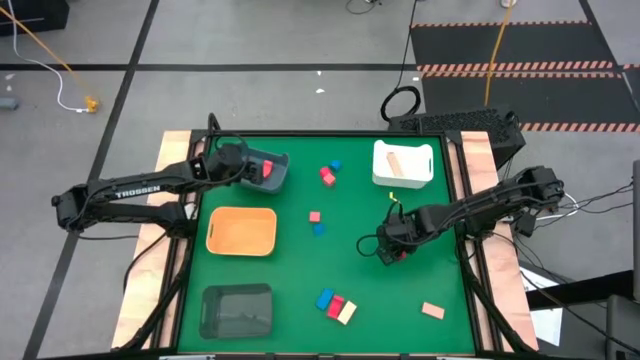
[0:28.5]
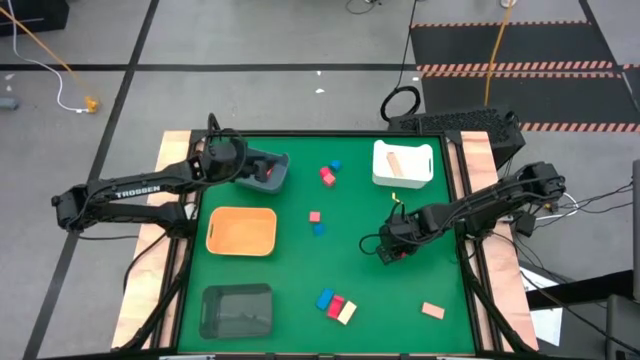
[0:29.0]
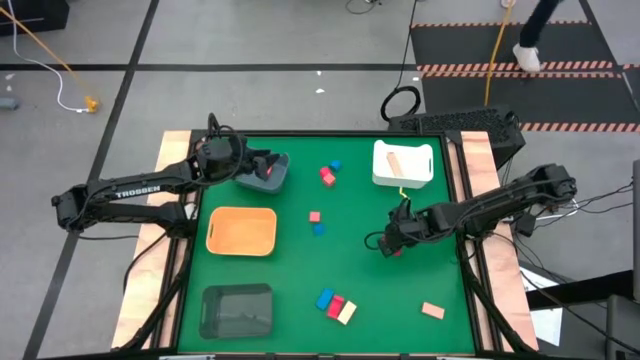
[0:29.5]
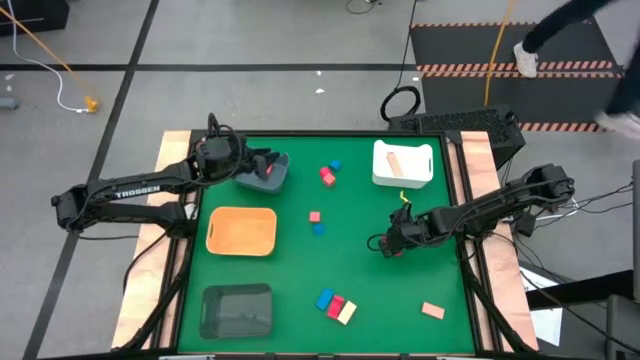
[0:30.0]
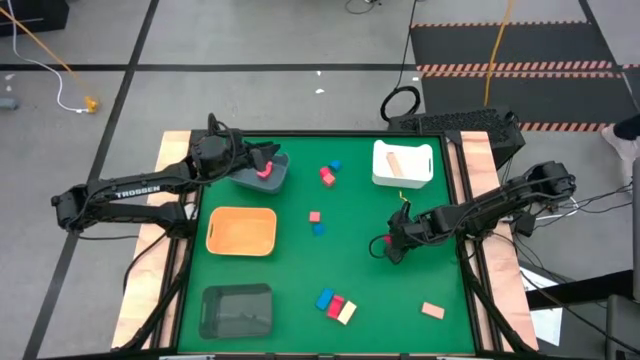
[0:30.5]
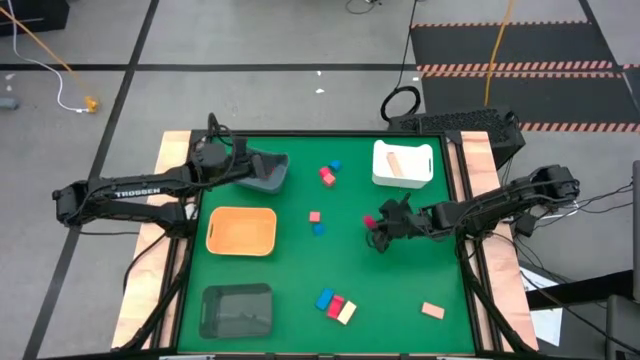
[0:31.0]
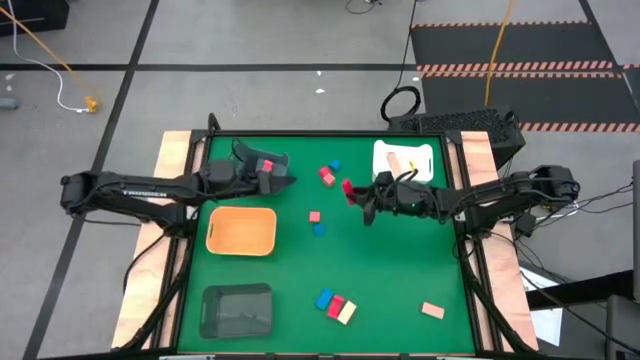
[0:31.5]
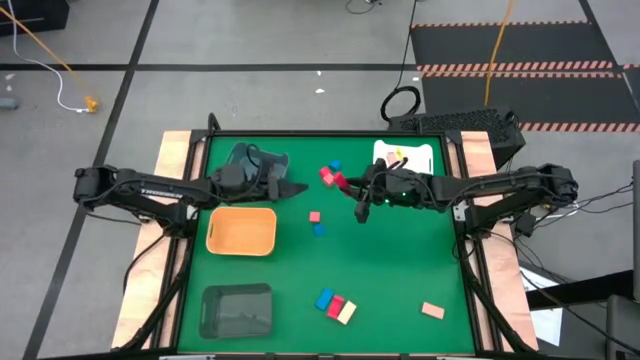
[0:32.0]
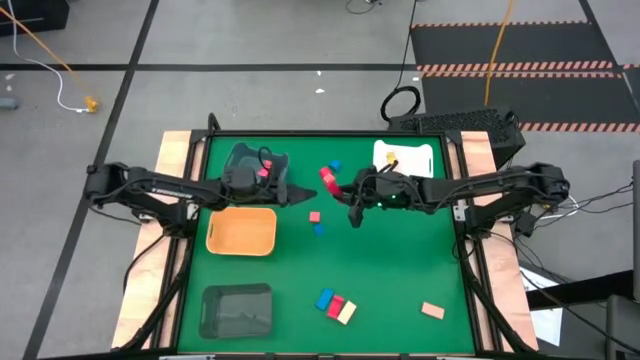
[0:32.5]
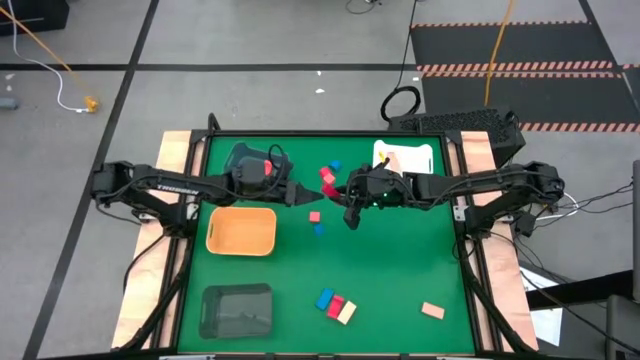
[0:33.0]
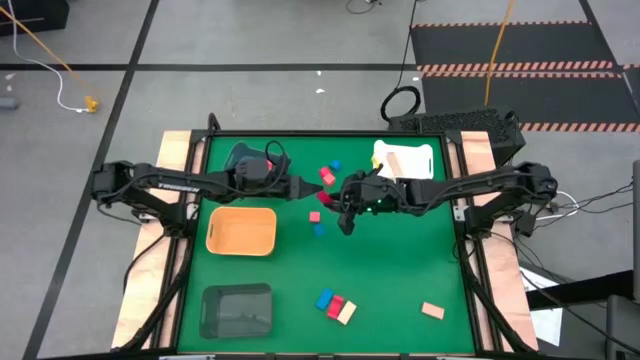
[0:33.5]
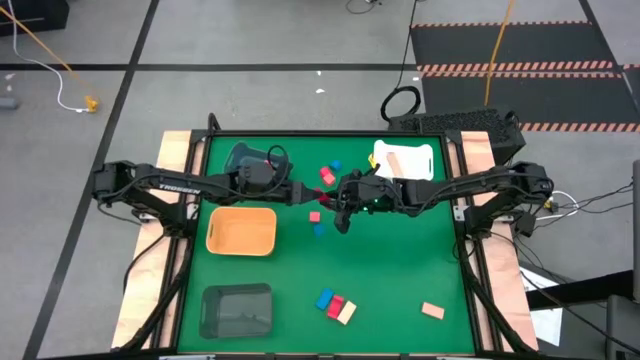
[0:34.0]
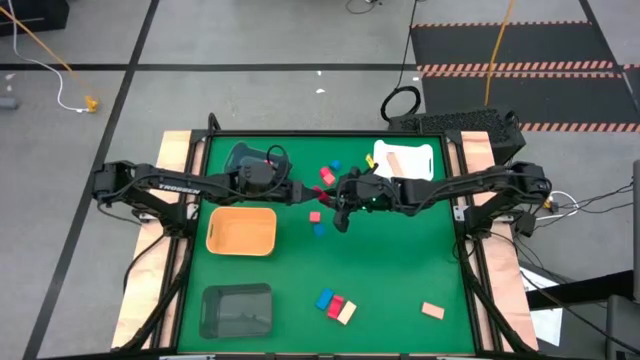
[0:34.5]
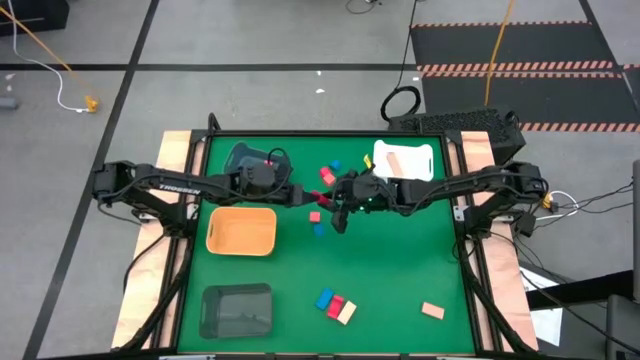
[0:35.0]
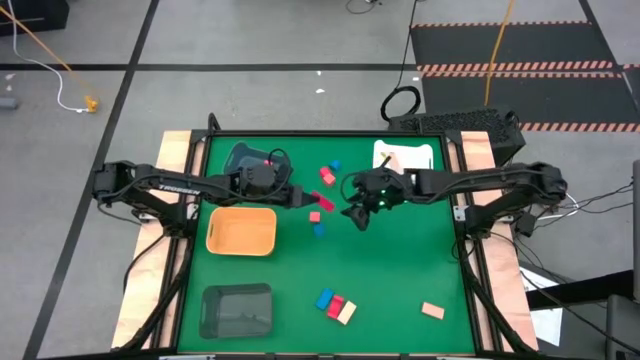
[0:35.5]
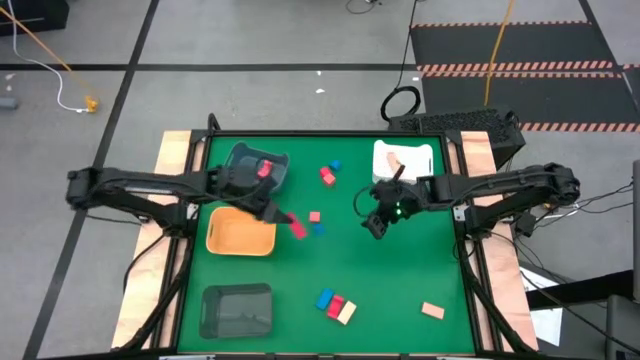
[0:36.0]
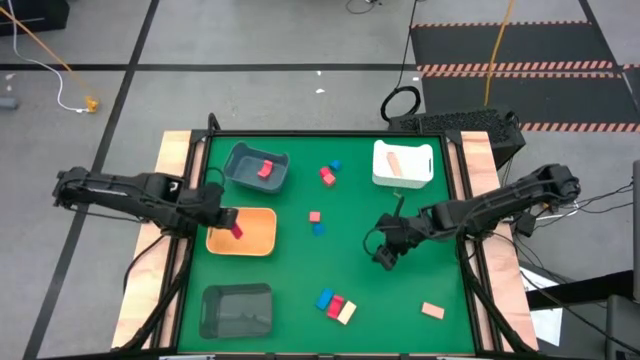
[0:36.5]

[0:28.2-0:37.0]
Task: Sort & place blocks by color
Put the middle right red block into the yellow bin

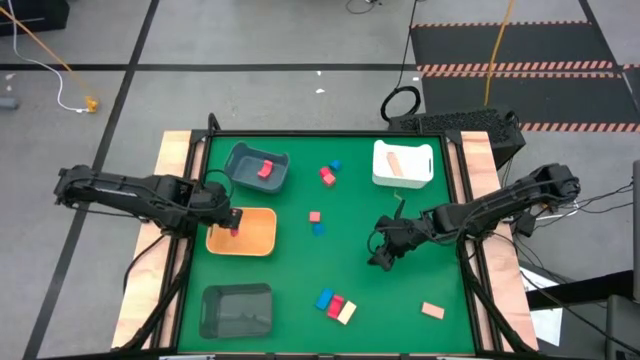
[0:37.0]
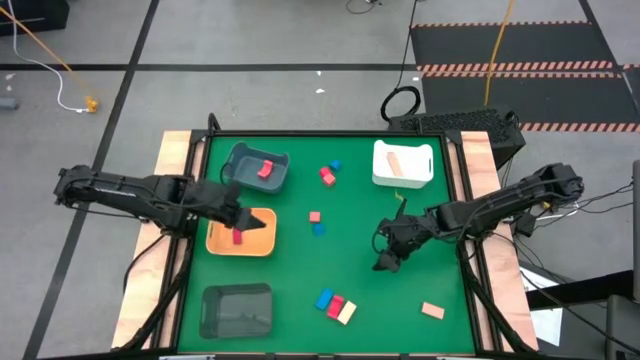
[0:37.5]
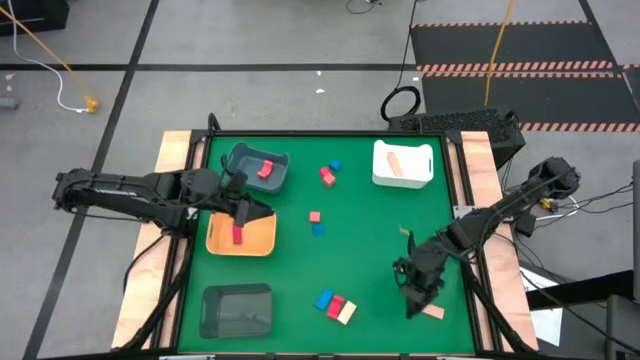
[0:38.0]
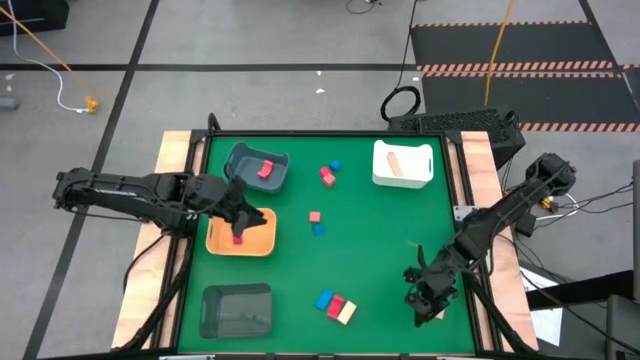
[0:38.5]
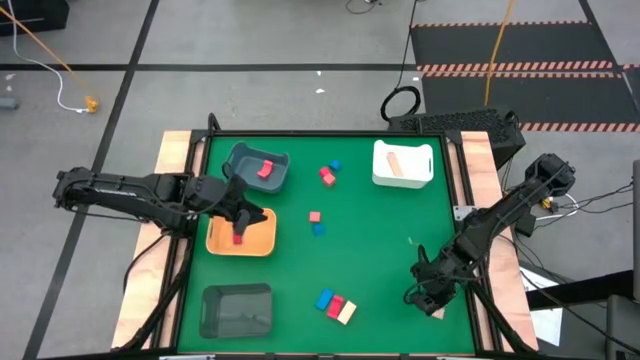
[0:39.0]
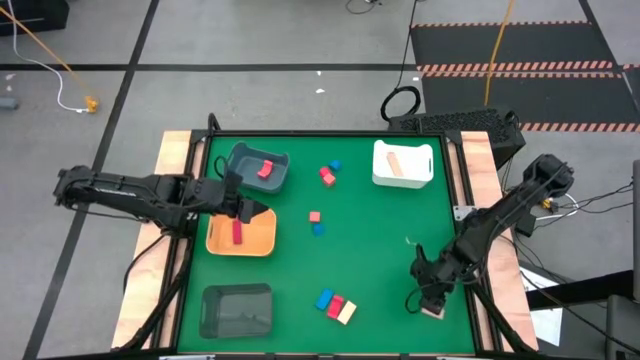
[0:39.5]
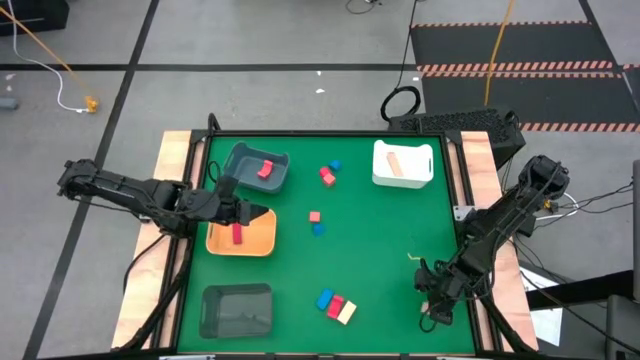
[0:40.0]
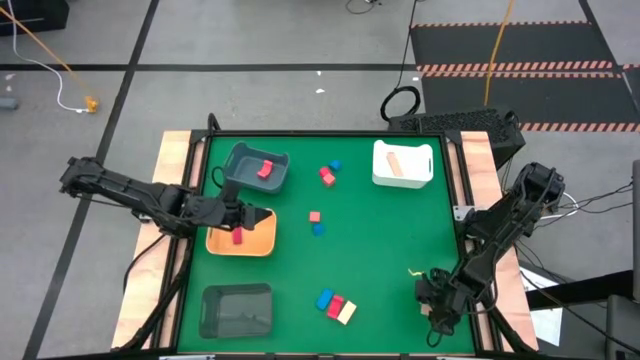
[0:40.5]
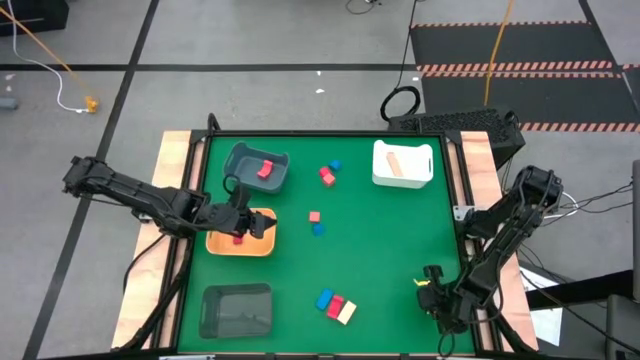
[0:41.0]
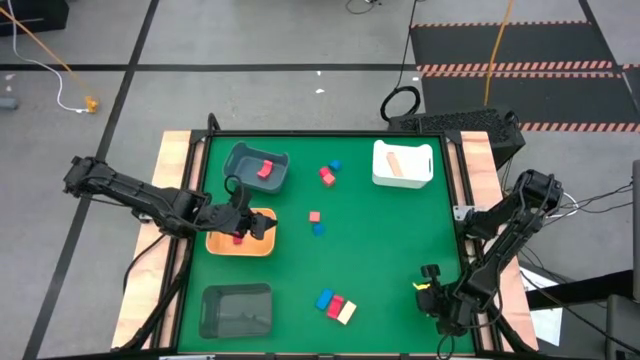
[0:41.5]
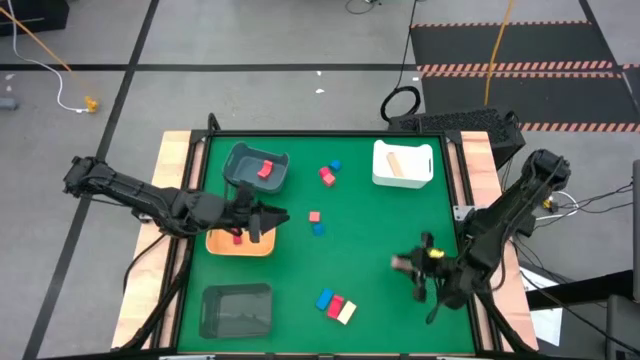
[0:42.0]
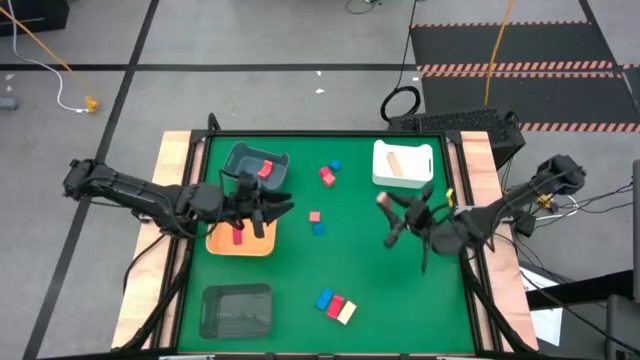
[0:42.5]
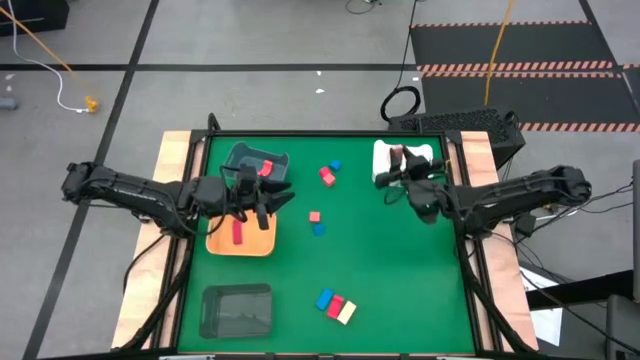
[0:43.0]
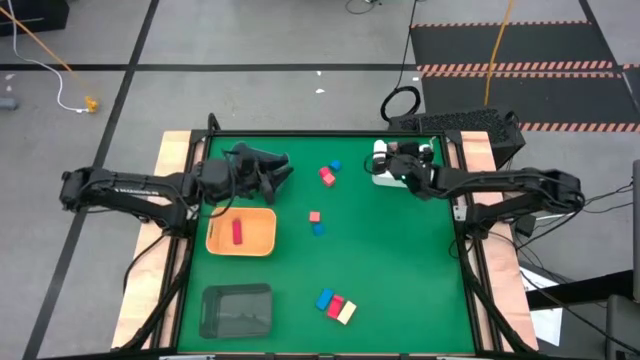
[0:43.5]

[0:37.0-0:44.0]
Put the right brown block into the white bin

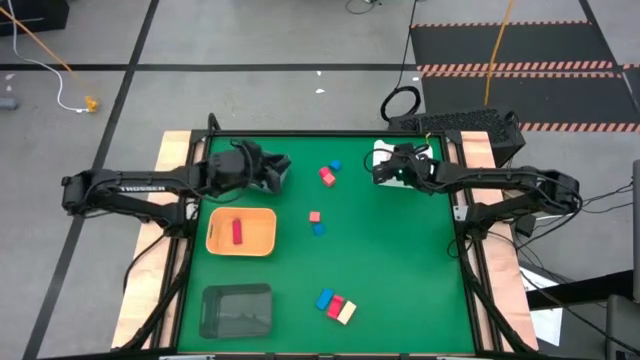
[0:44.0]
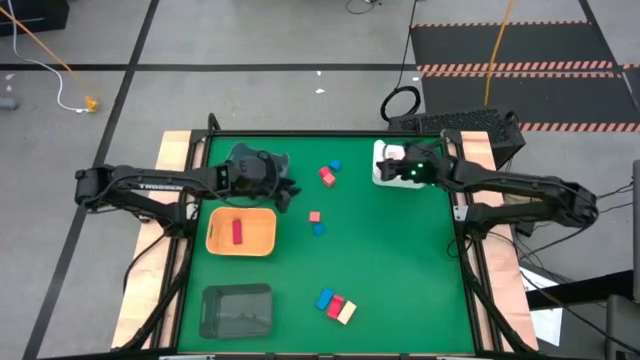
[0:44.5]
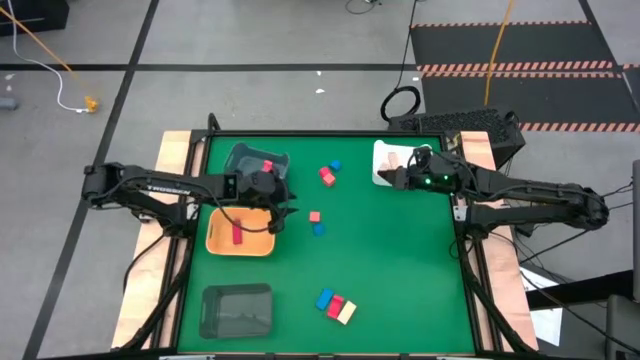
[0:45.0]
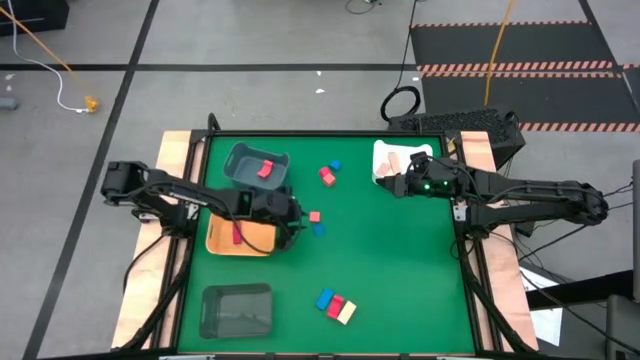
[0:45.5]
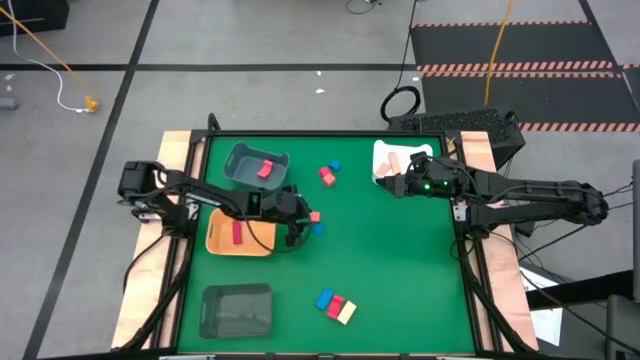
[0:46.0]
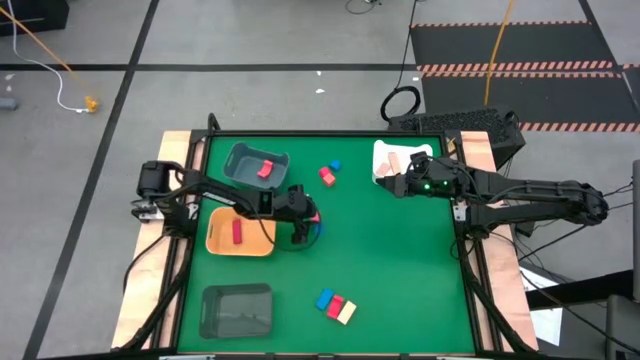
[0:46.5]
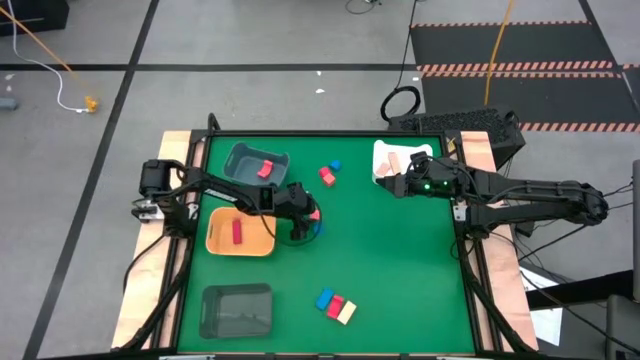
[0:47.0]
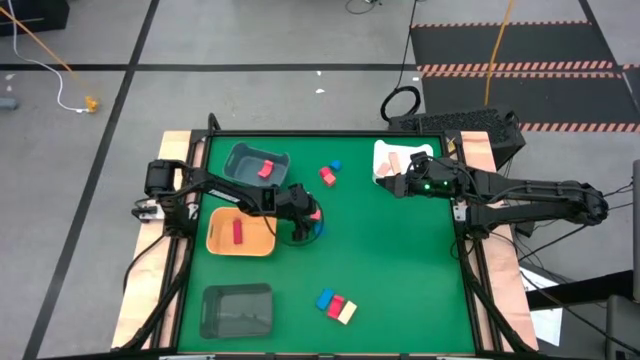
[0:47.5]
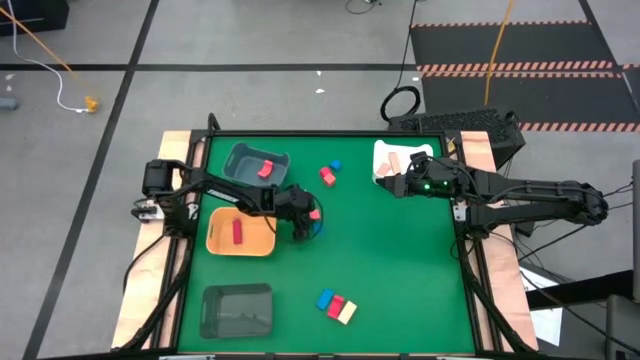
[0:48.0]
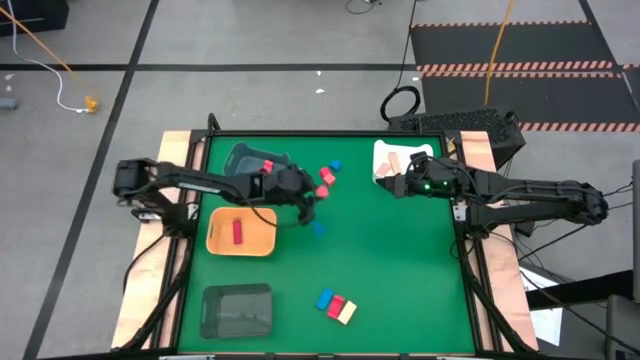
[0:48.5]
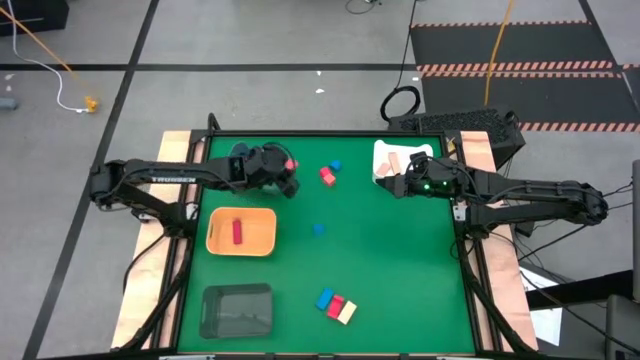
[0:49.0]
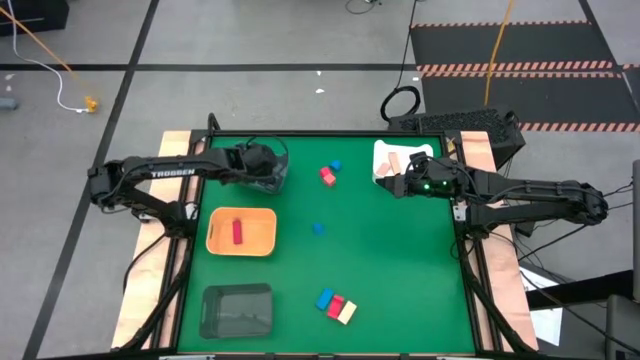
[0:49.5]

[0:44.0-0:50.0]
Put the bottom orange block into the blue bin
